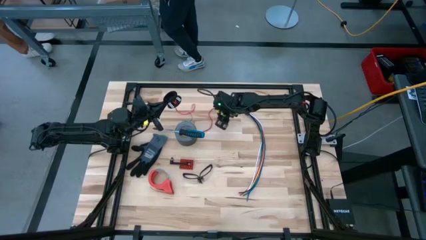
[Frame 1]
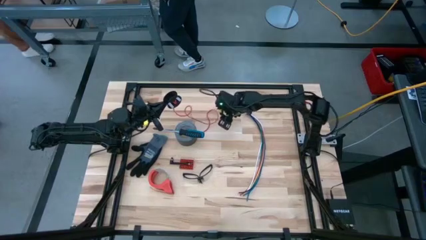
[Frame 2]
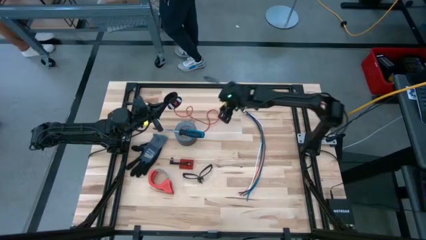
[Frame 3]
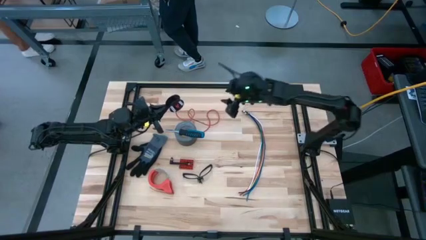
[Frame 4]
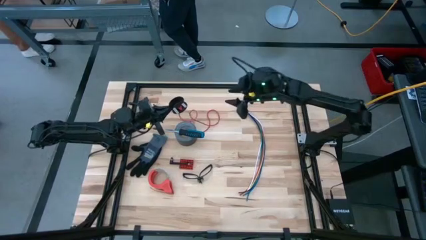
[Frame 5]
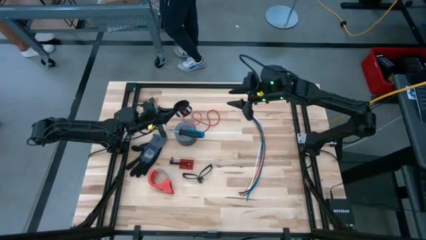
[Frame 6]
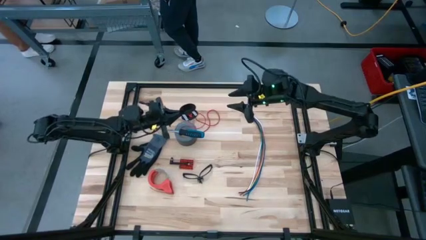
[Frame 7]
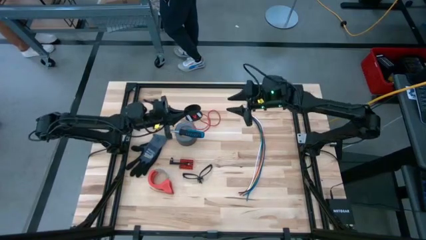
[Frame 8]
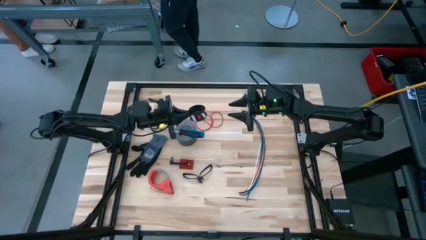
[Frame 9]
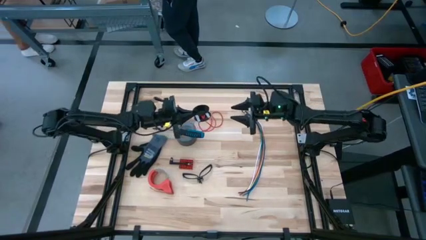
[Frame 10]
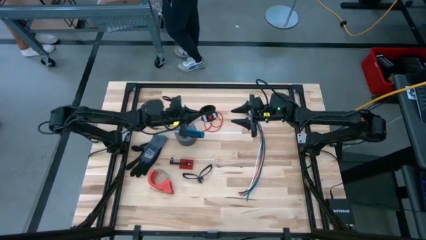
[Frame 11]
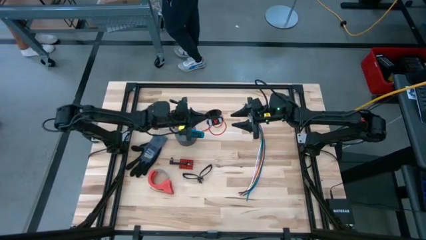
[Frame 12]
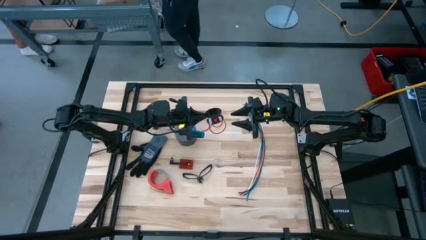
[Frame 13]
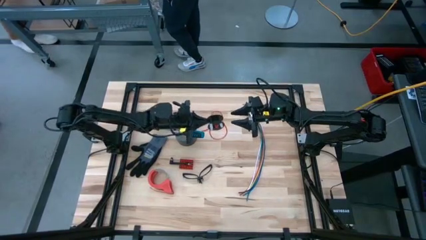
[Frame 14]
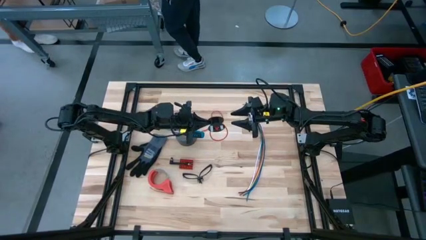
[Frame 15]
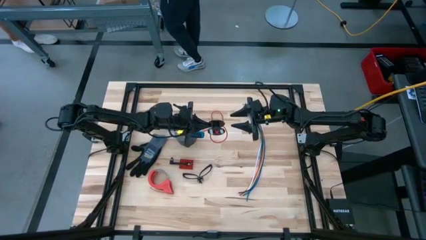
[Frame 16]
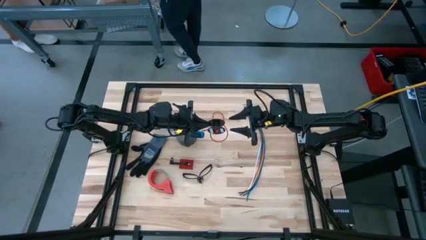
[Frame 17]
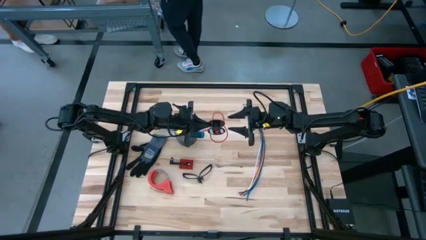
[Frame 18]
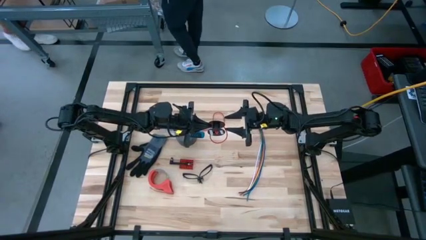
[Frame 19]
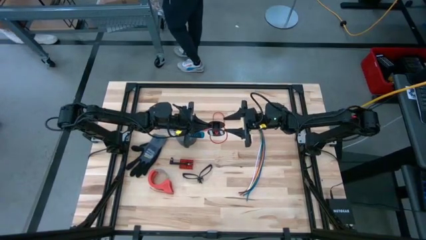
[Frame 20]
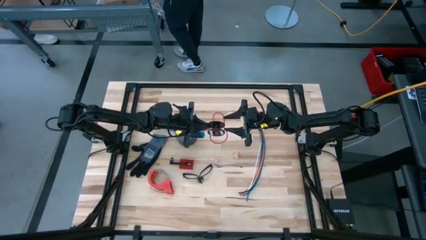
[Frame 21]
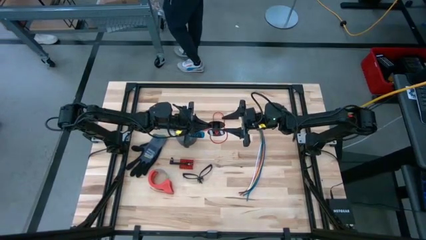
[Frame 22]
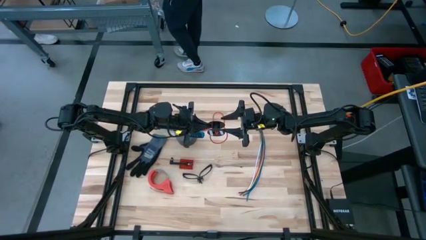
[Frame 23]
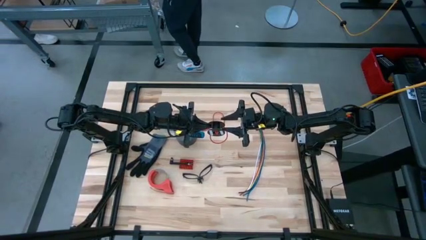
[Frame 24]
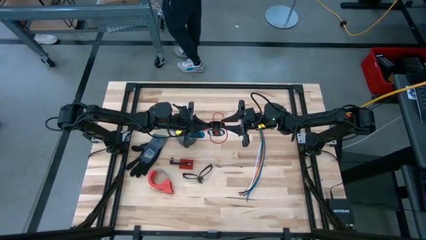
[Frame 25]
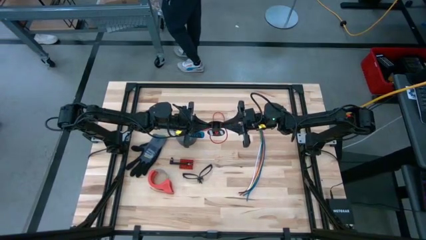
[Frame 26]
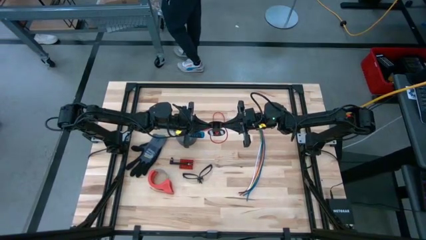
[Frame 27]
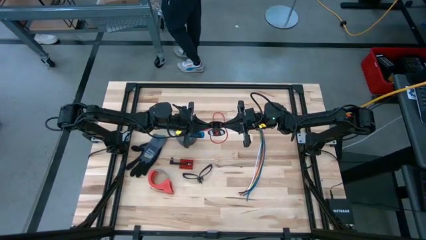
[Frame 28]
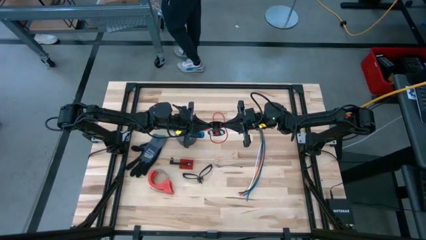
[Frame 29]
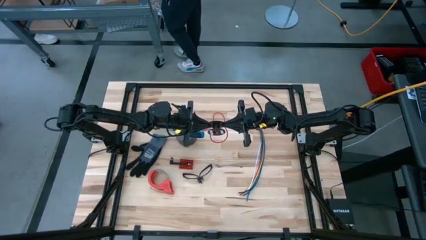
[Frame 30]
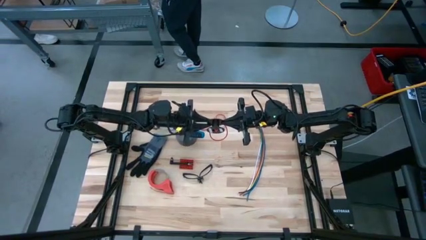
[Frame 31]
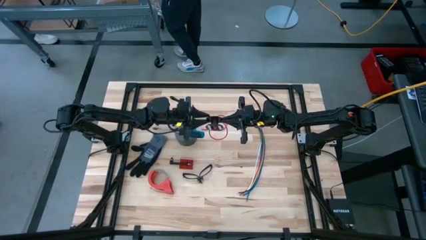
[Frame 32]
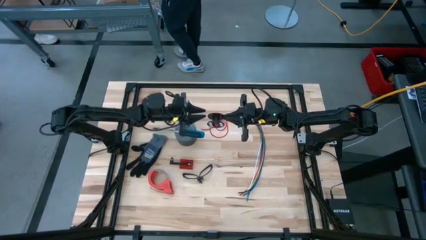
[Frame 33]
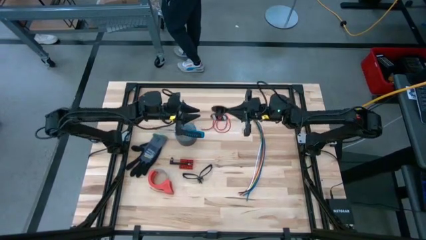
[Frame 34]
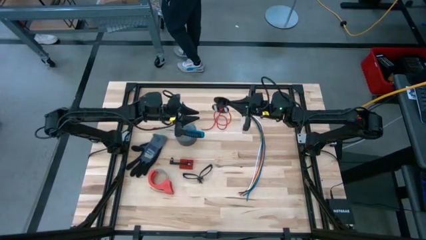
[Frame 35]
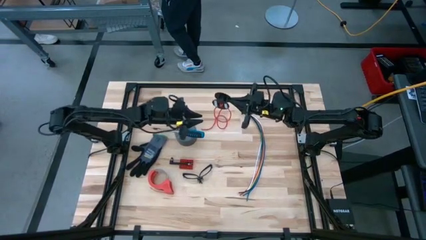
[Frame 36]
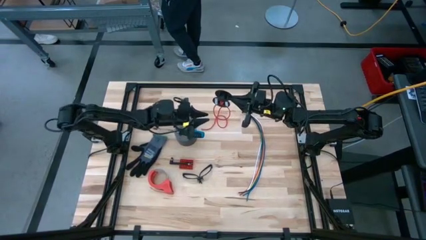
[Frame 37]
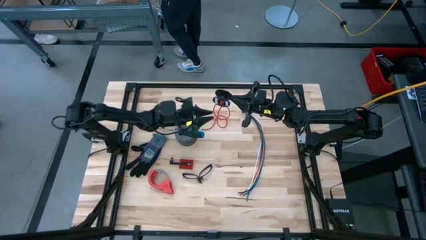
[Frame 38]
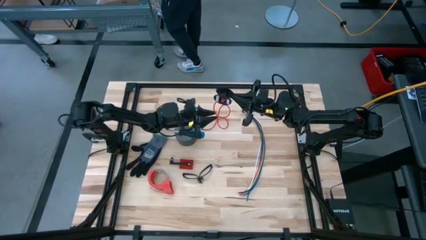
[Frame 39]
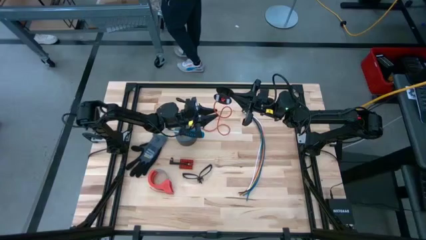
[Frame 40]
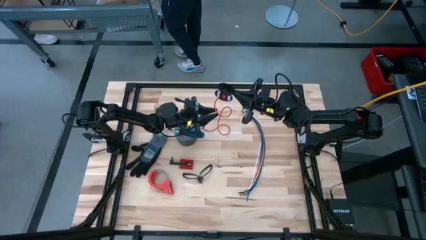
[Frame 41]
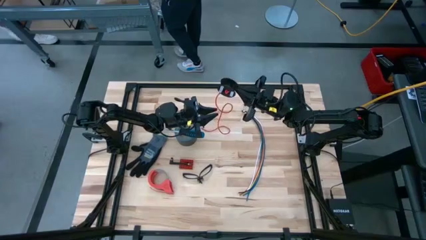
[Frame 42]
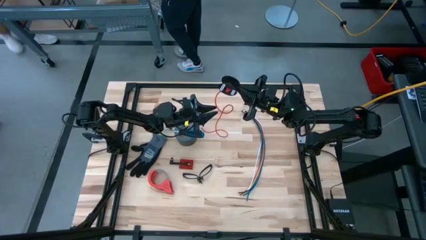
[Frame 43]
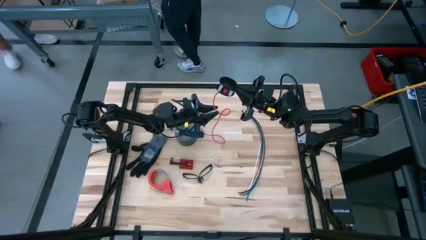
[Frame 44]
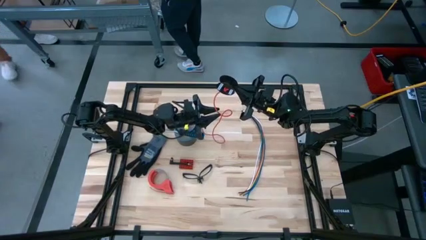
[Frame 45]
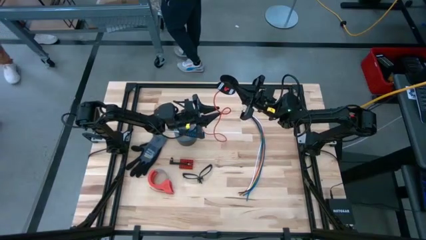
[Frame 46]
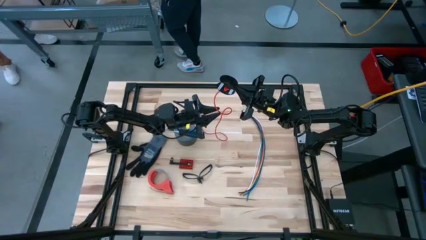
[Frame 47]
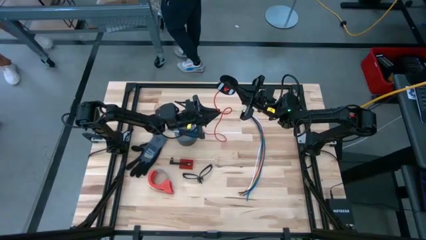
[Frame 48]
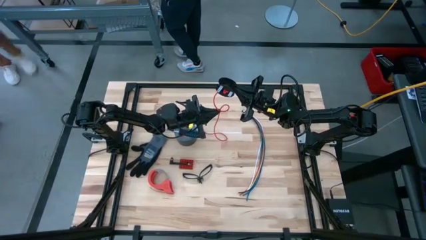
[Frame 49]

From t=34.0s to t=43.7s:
Task: Coil cords
Coil the red wire into the black spool

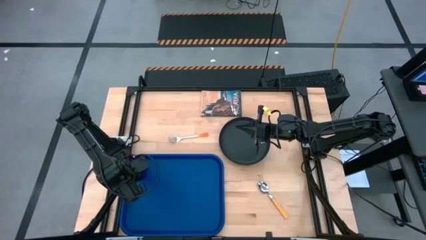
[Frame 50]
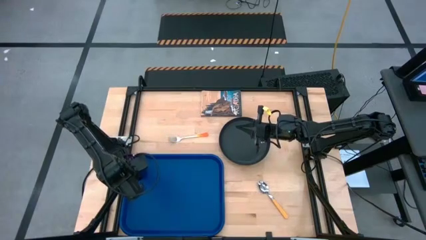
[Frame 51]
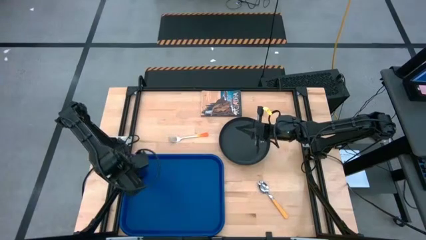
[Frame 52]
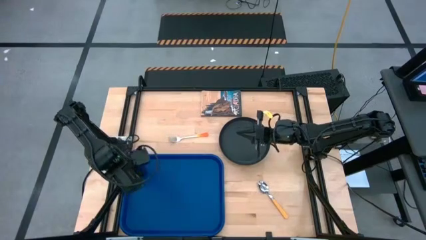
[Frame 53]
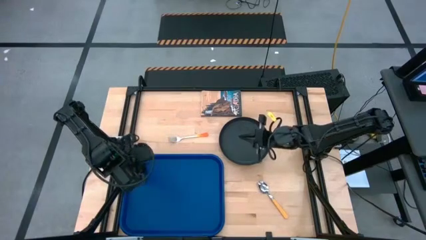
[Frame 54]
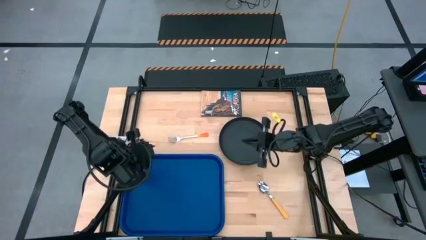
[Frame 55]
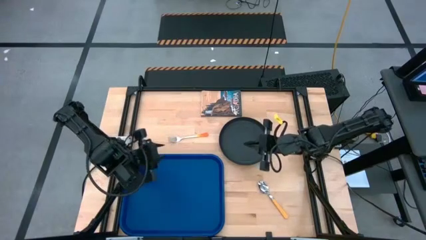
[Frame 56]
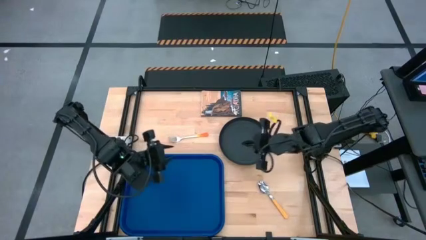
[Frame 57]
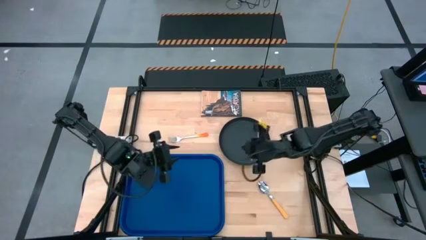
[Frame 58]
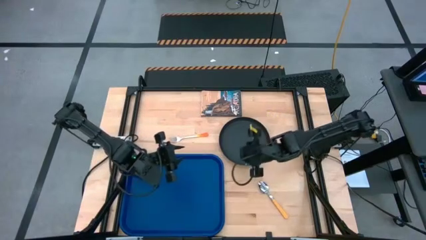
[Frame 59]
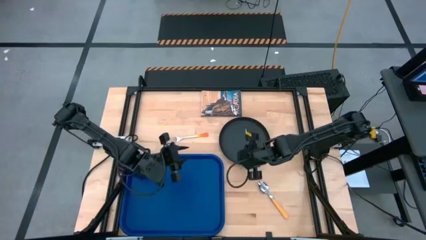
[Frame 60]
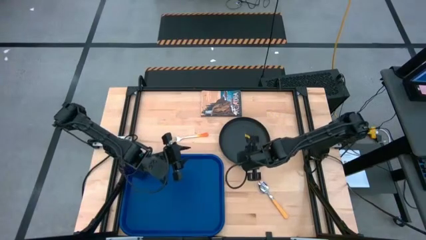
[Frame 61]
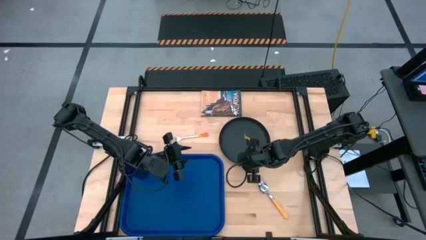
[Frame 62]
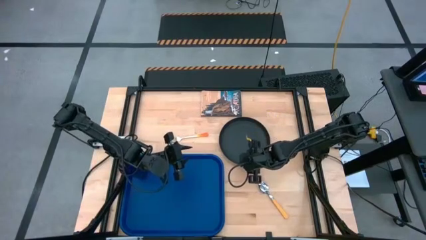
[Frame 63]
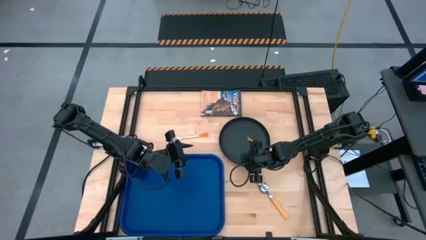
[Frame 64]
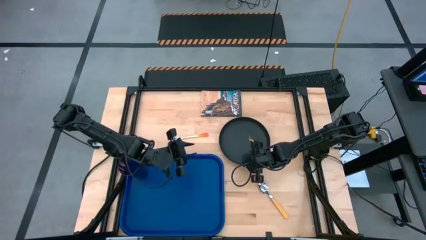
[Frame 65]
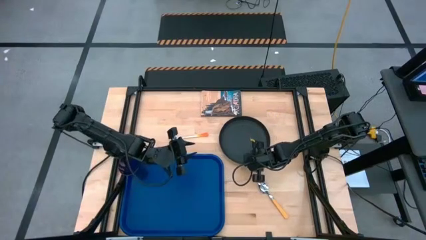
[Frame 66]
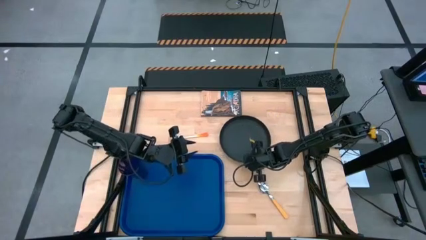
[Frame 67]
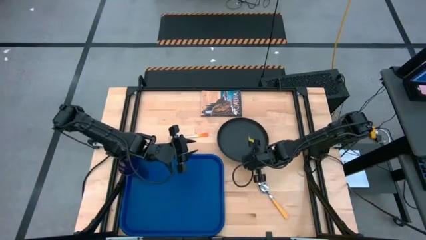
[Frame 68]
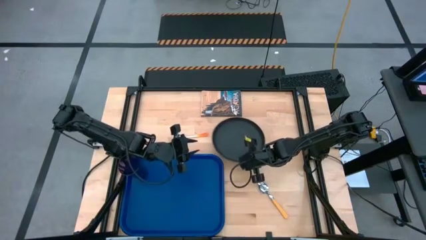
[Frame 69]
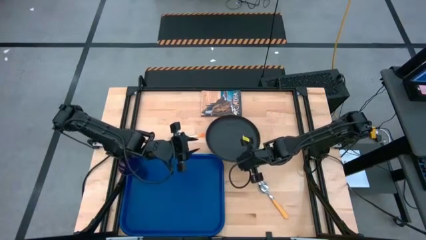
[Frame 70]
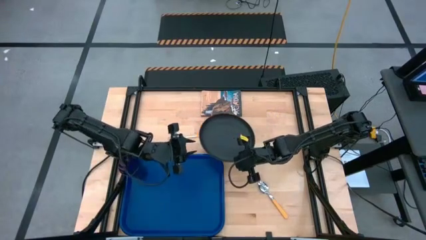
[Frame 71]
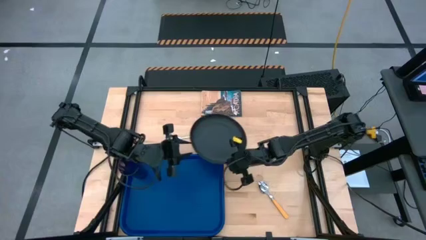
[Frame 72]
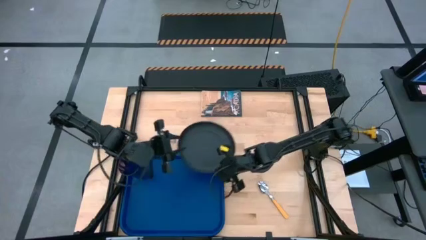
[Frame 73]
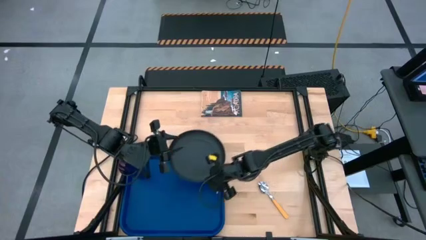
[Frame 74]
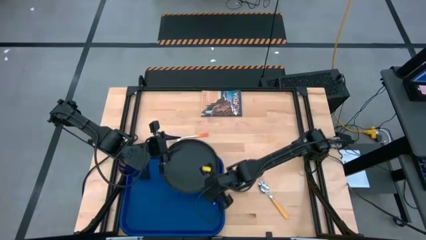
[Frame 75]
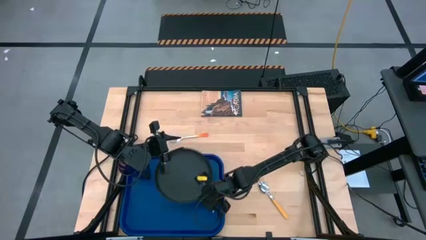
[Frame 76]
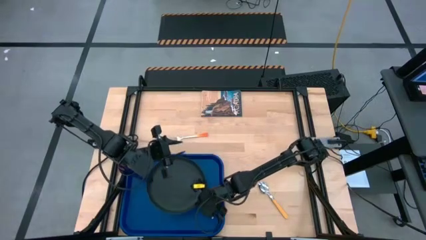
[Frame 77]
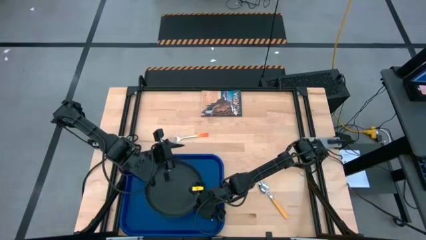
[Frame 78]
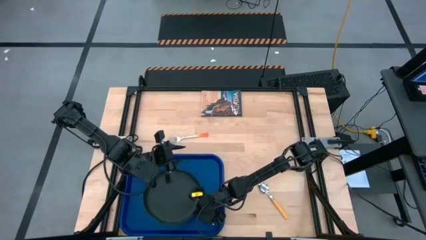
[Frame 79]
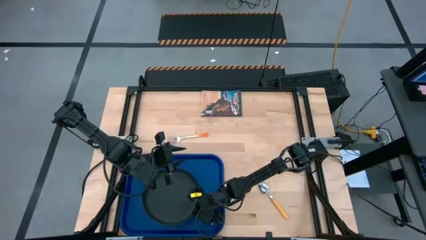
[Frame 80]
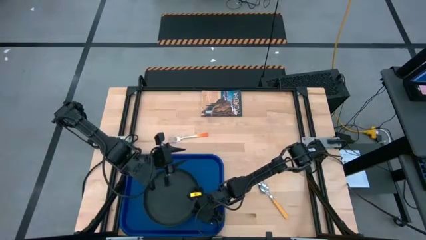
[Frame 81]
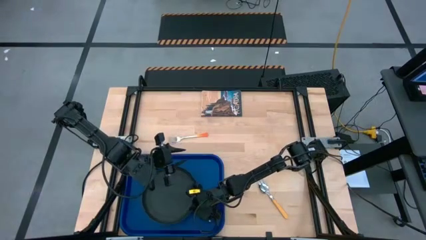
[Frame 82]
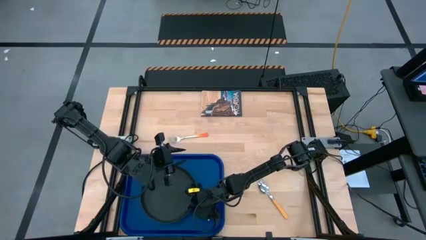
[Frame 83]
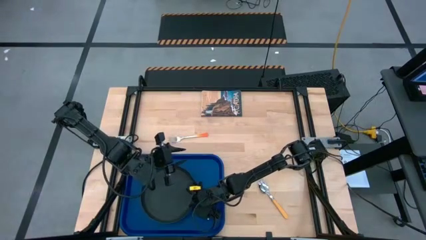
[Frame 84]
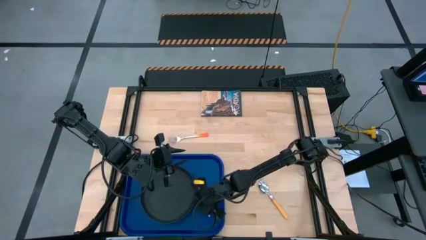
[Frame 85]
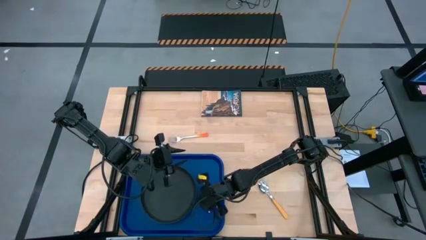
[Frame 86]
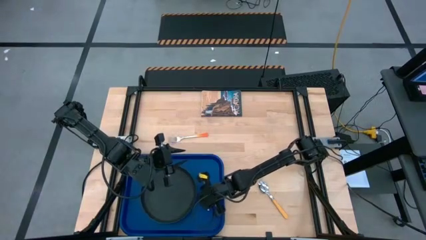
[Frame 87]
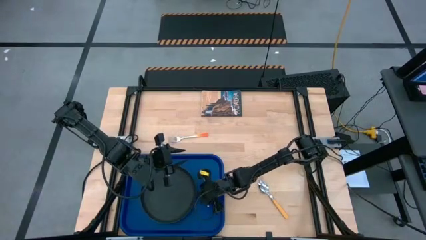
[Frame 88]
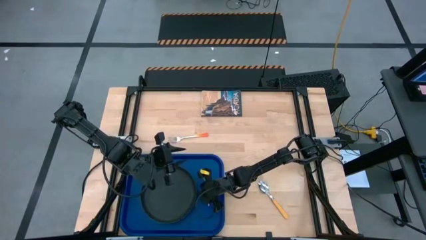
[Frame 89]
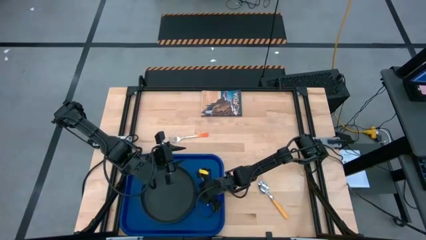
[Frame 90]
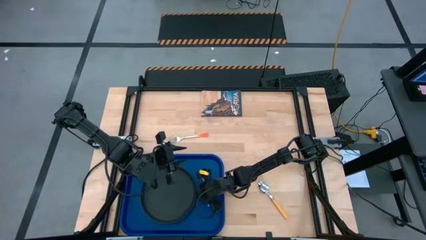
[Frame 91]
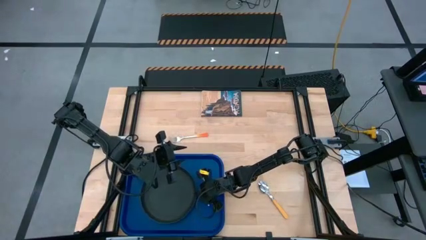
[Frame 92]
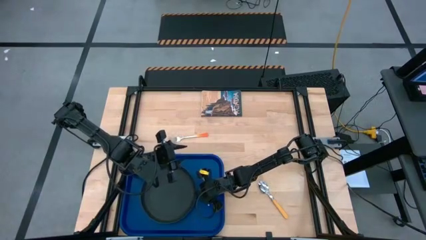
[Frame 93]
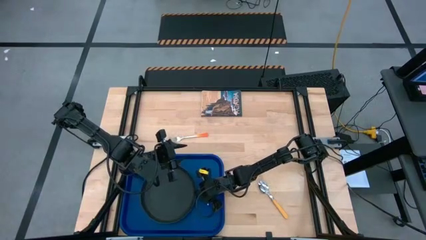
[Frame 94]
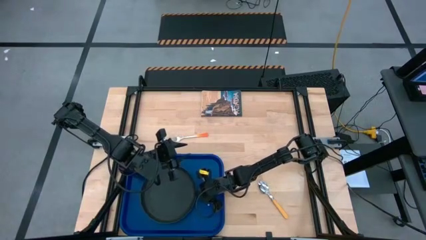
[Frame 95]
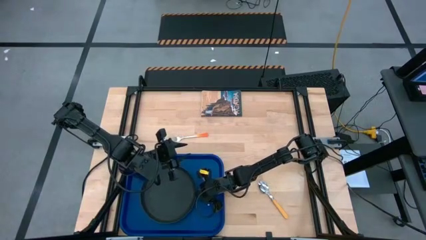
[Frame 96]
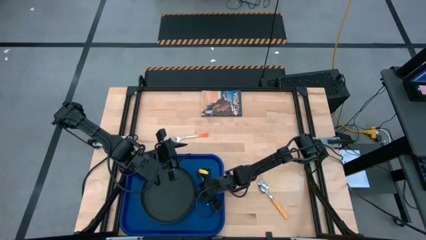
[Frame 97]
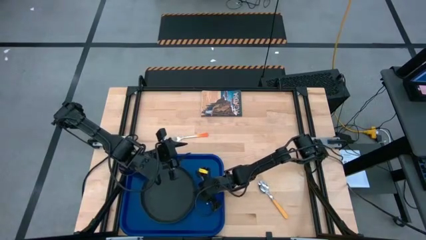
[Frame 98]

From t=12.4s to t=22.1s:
Task: Pick and place plate/cup/fork/spoon on tray
Put the black plate on the blue serving tray to the bottom right of the violet glass
